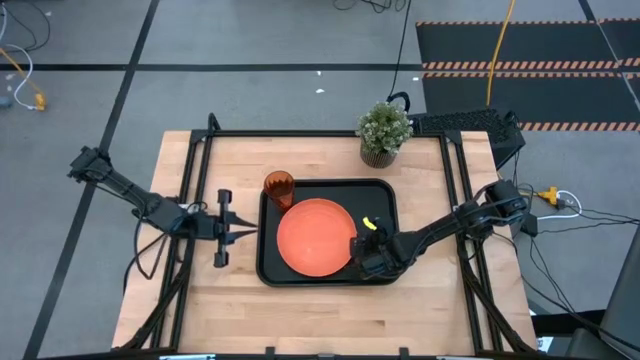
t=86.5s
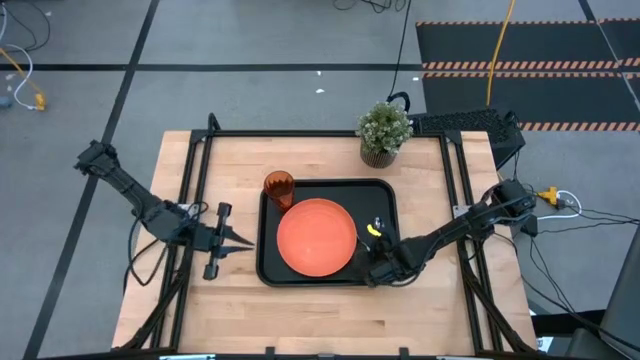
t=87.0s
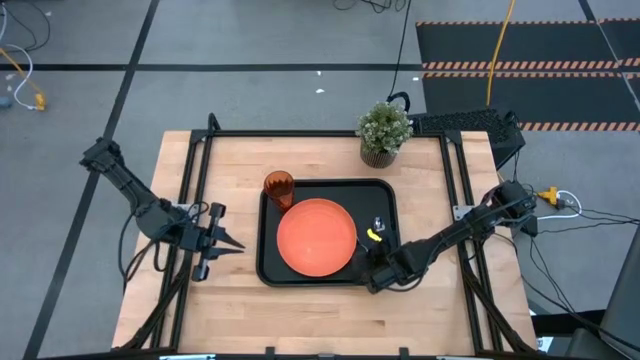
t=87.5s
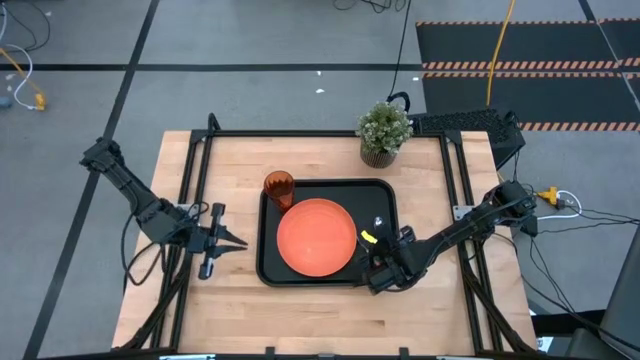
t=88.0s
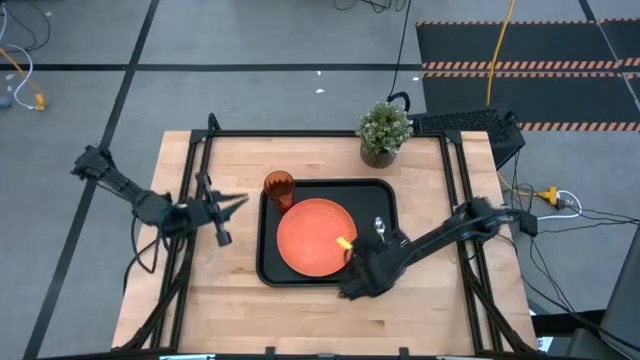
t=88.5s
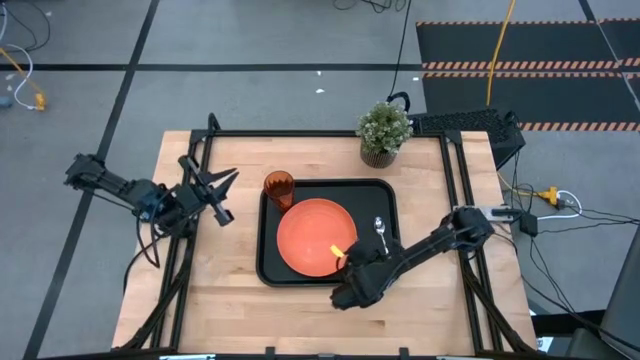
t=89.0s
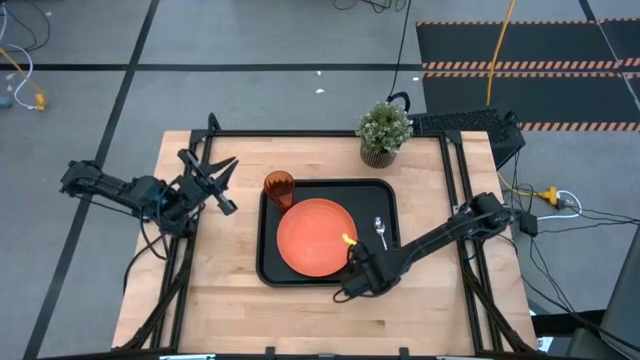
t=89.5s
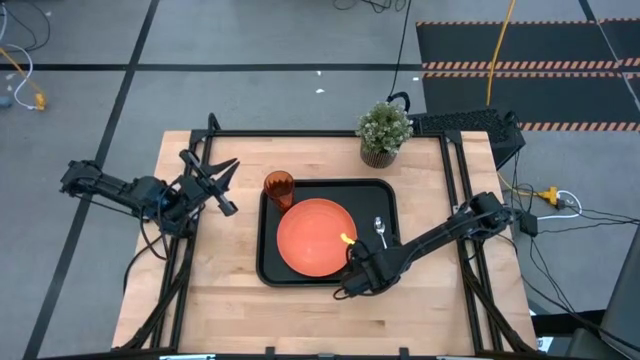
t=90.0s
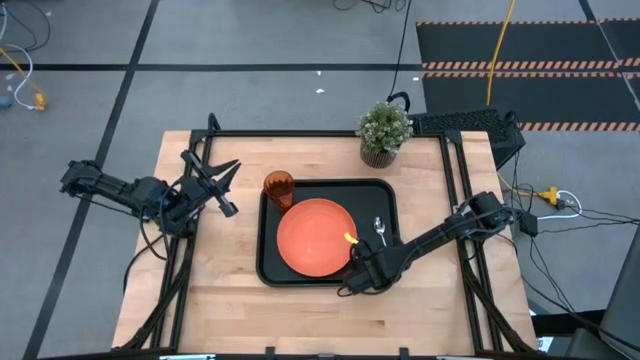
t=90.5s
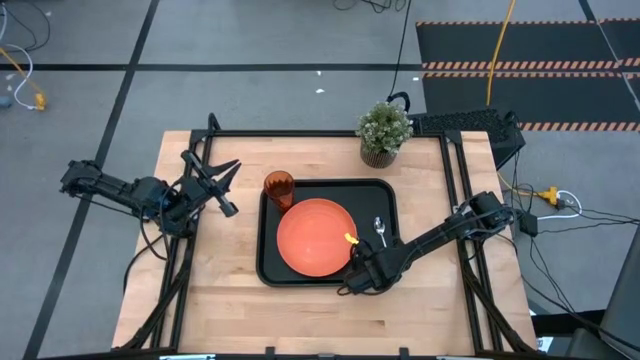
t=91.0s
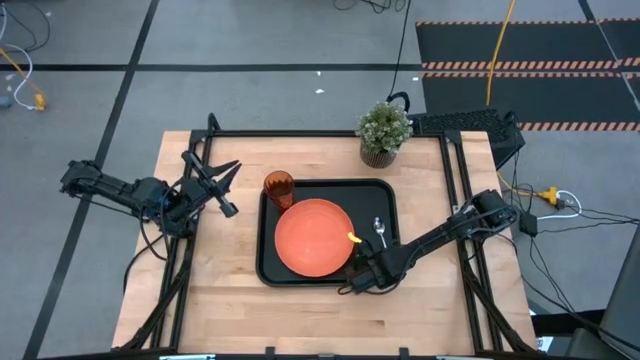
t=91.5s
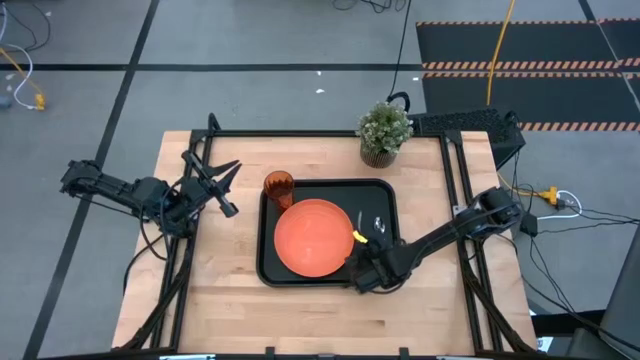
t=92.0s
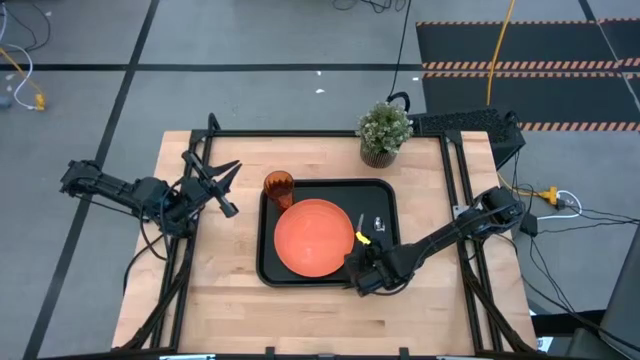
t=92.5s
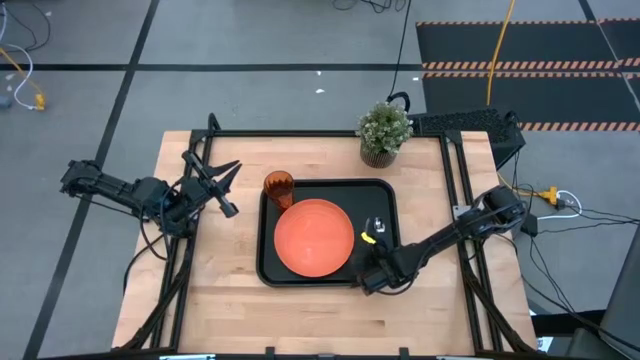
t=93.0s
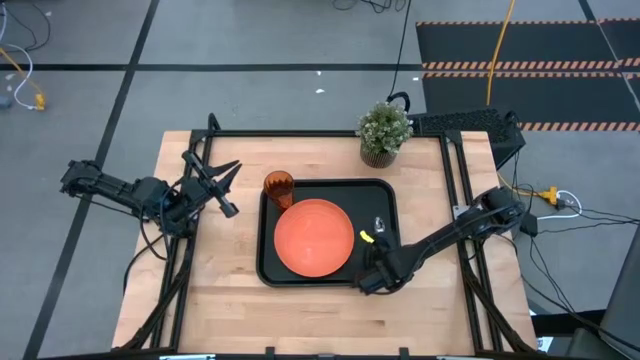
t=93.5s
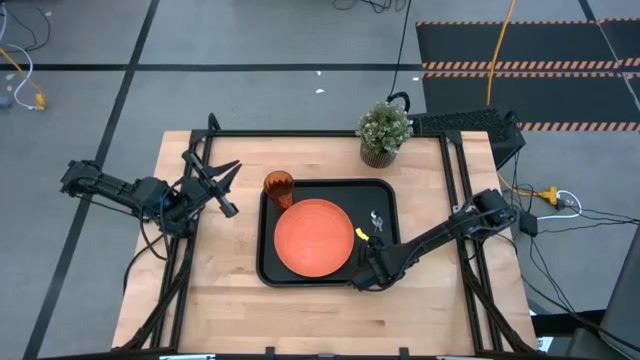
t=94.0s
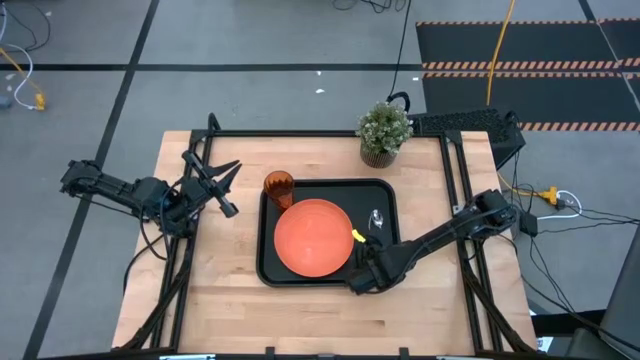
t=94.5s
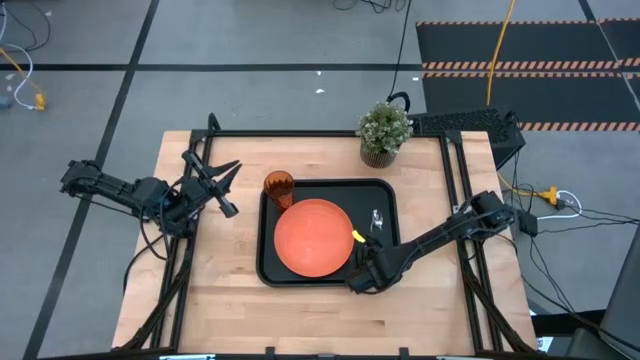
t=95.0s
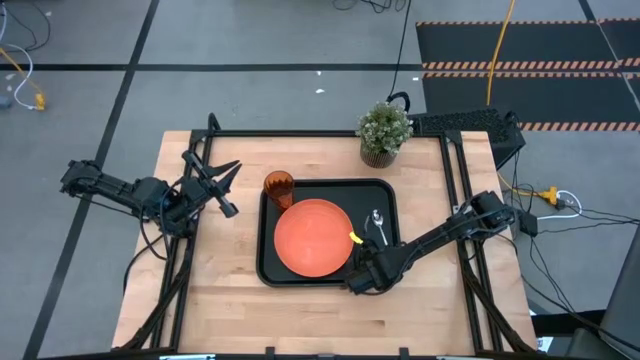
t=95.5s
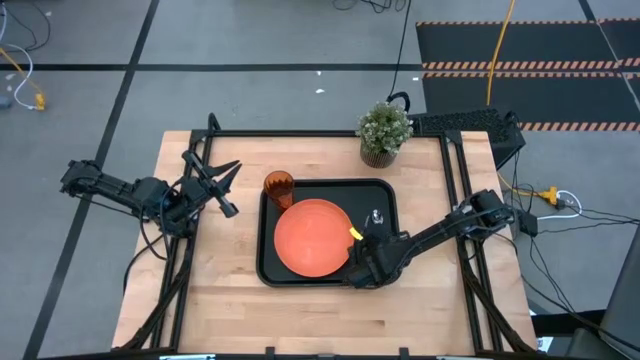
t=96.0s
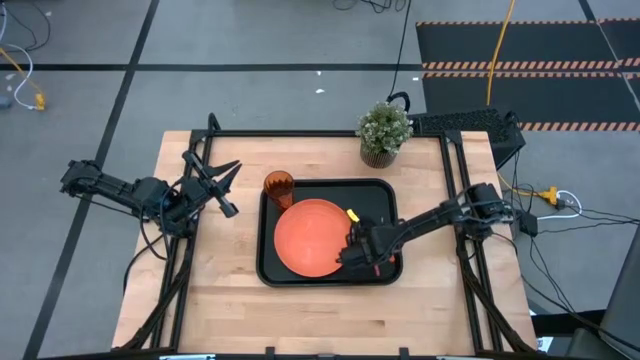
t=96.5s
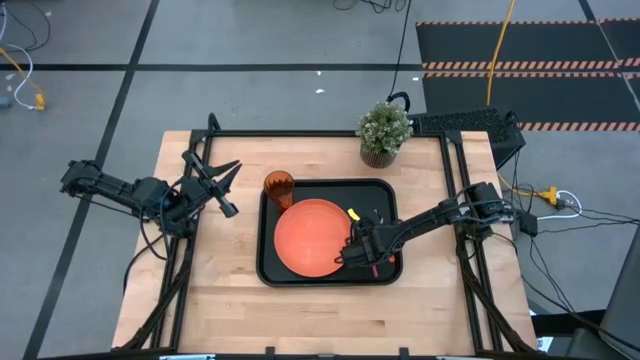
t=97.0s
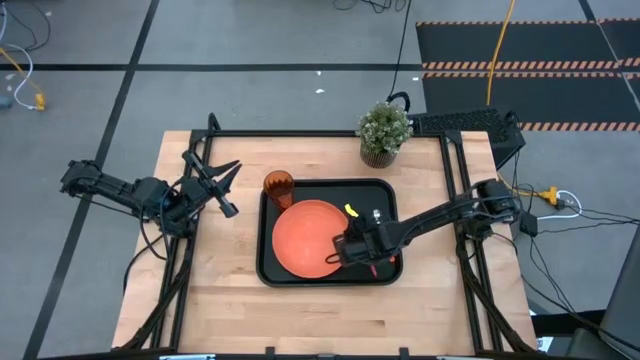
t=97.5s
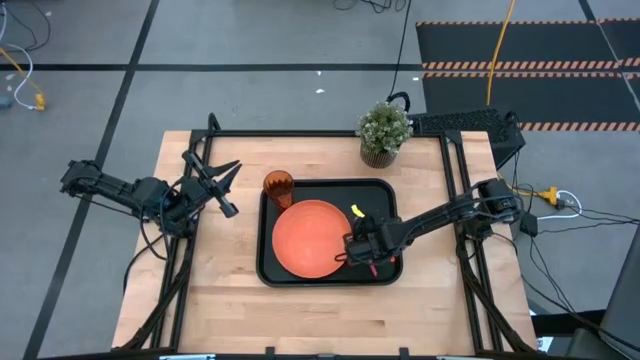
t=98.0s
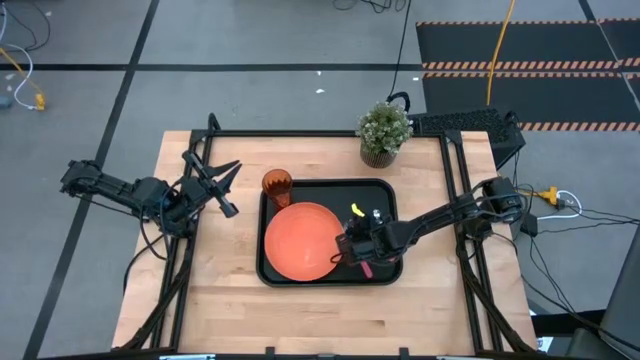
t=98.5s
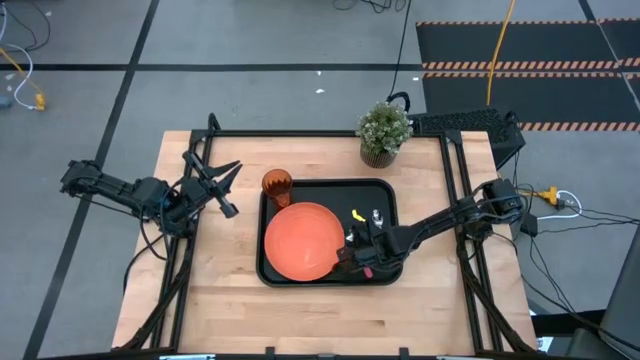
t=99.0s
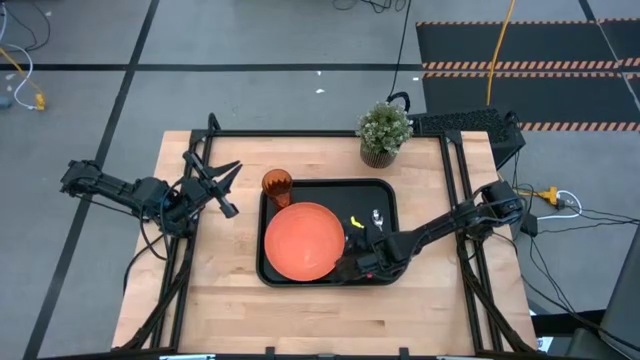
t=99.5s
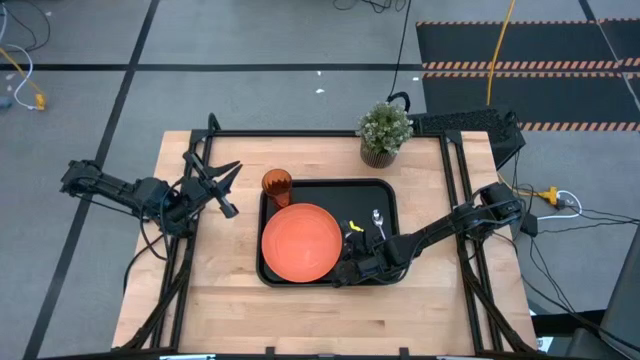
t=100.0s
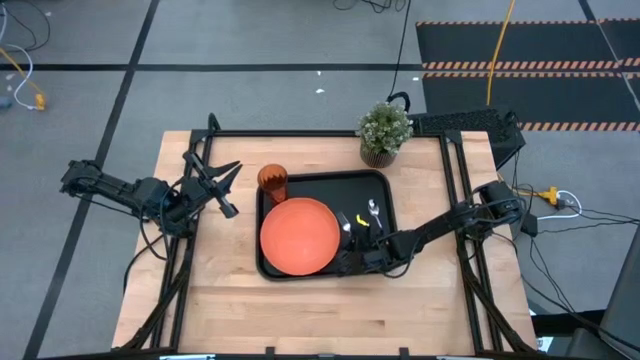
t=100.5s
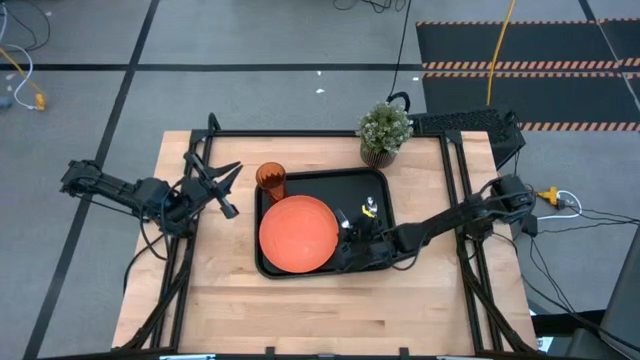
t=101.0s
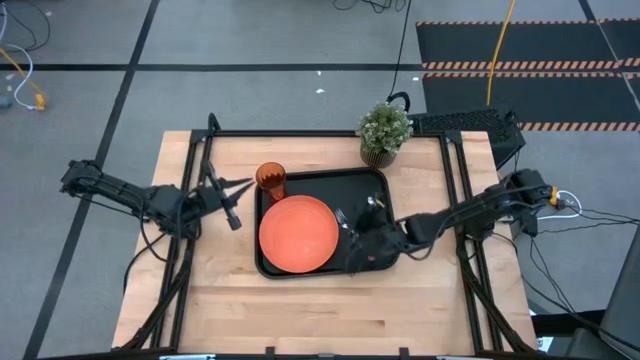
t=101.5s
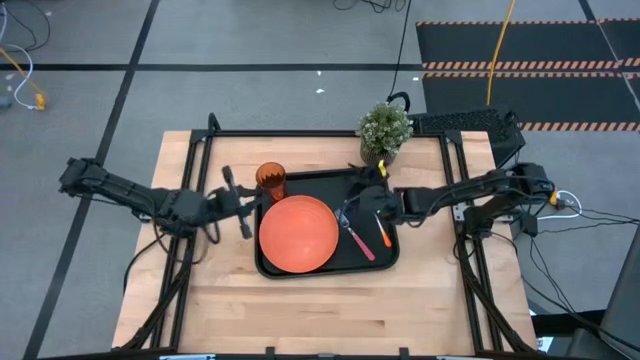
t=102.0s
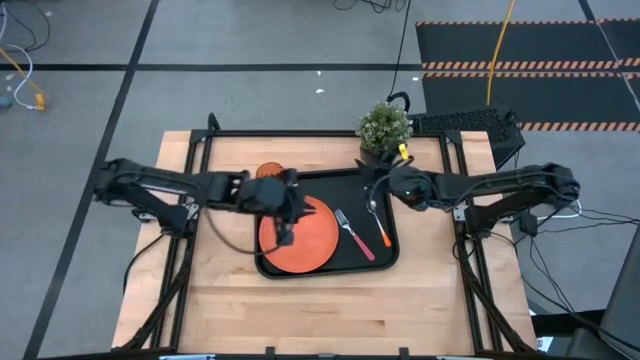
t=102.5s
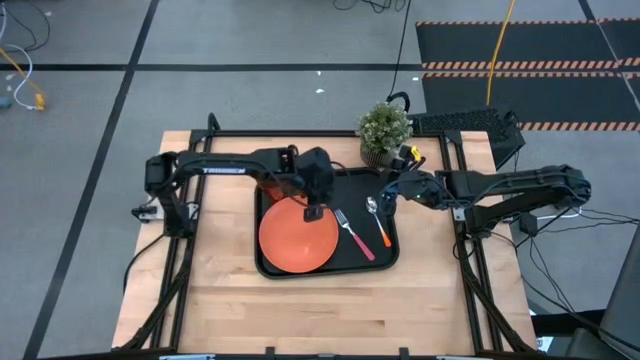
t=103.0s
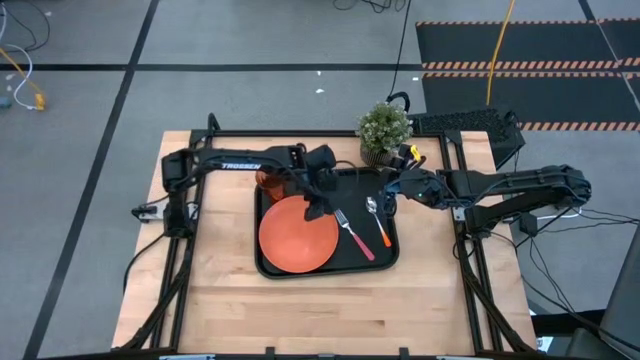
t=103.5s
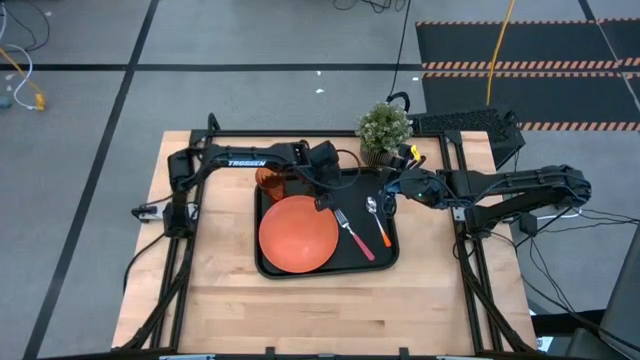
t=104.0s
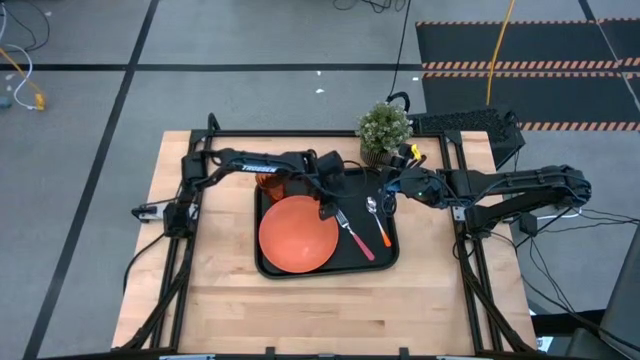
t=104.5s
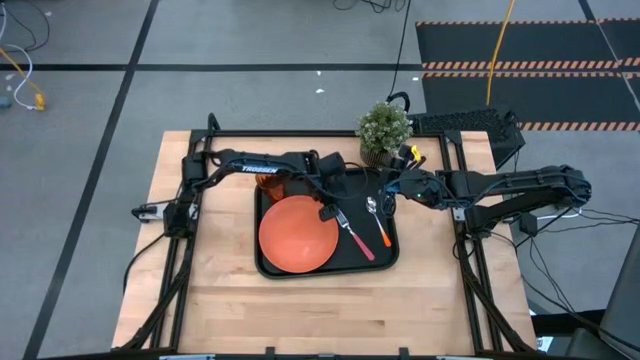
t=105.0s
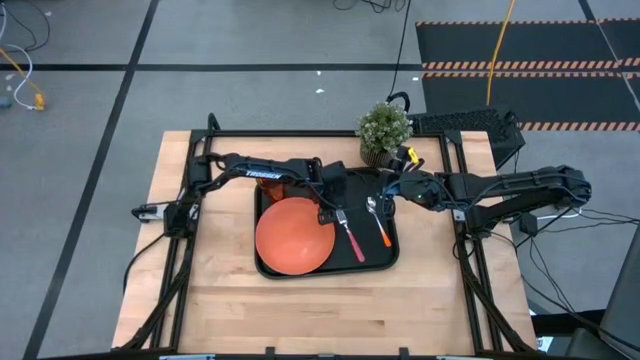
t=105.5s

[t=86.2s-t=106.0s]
Task: Pick and place plate/cup/fork/spoon on tray
Adjust the pink fork on the black serving tray

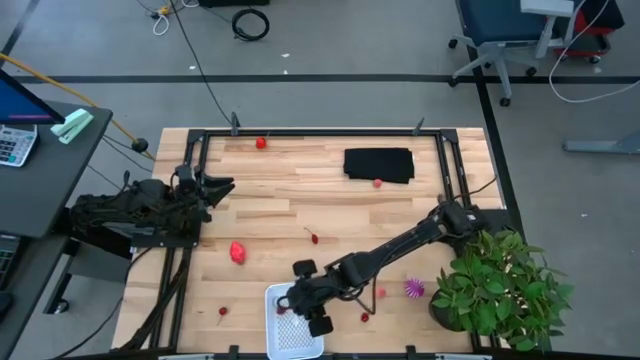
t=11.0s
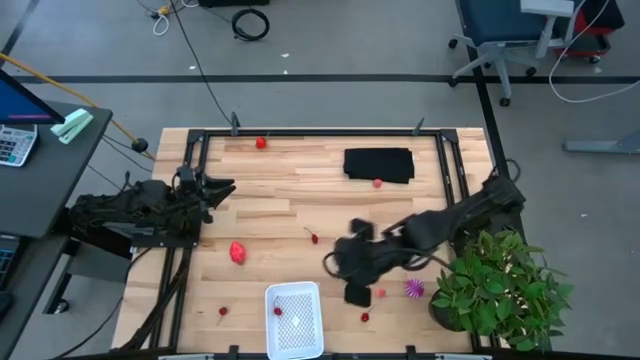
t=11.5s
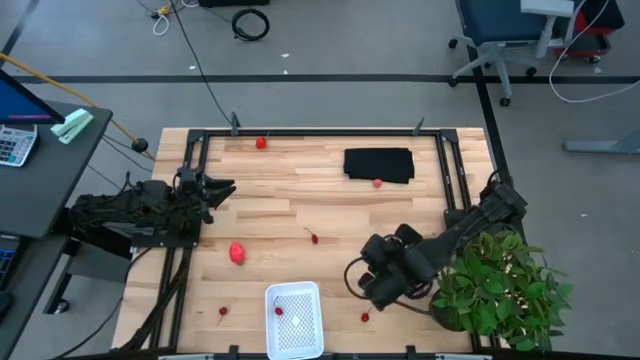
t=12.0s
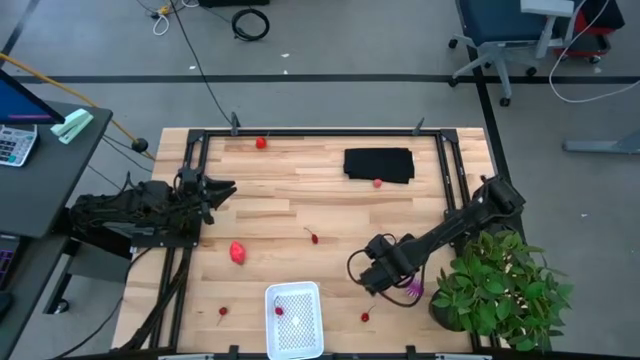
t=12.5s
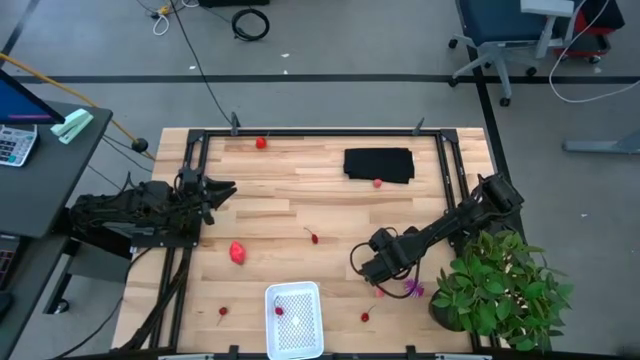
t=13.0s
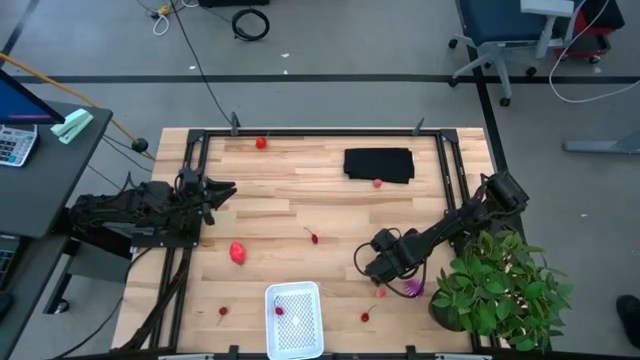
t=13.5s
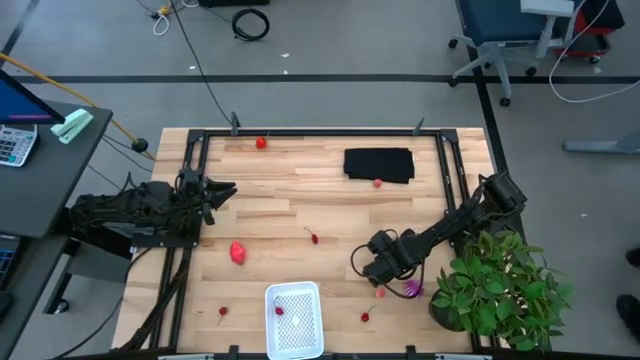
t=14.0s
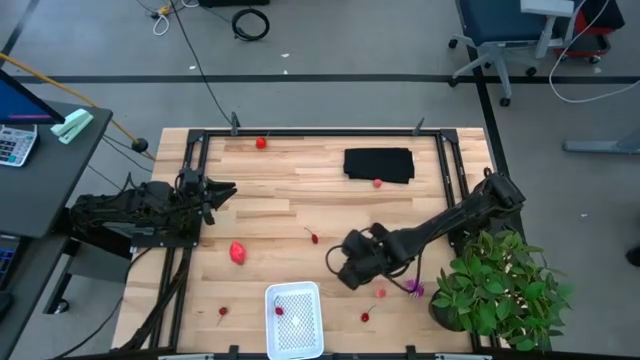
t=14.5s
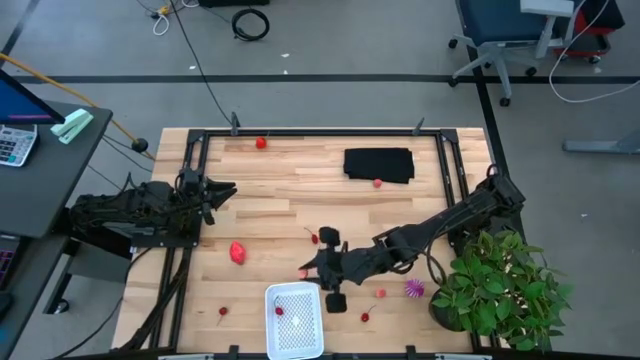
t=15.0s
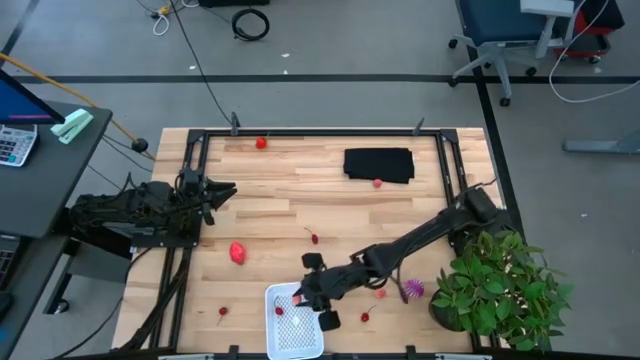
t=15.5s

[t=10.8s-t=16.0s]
Task: Pick and placing Produce into tupperware
Put the middle lychee into the white basket
